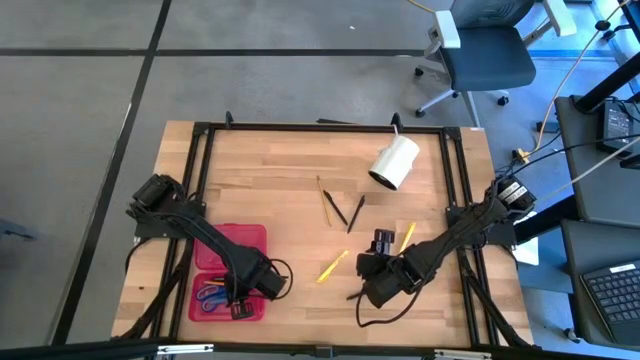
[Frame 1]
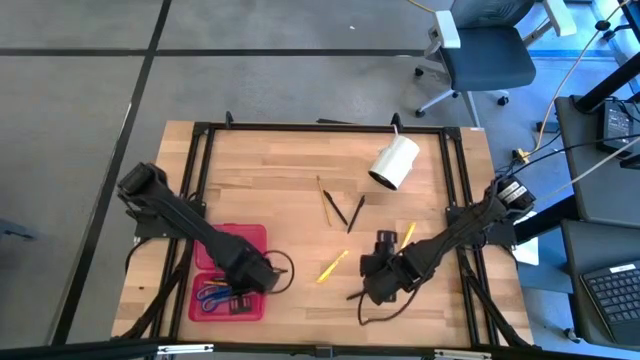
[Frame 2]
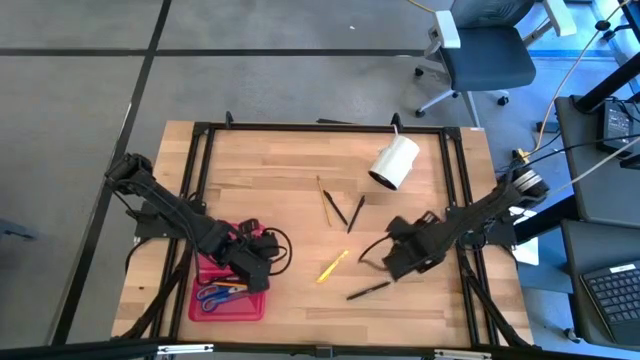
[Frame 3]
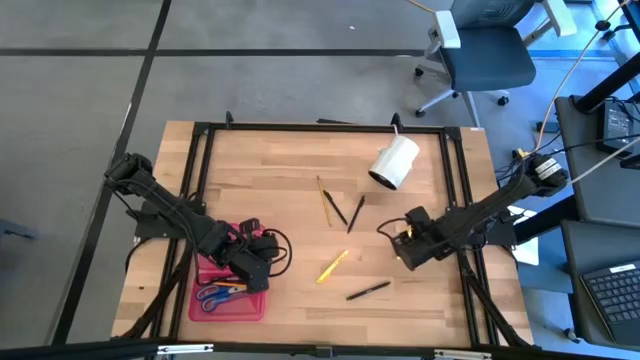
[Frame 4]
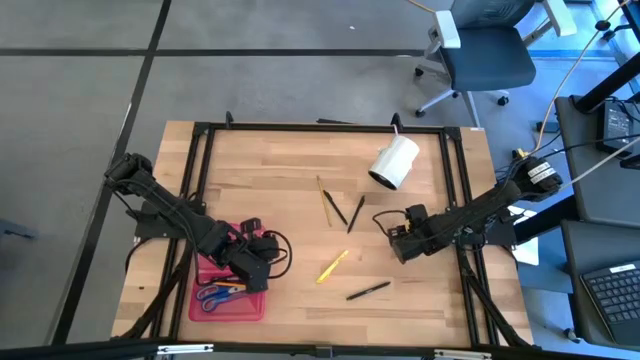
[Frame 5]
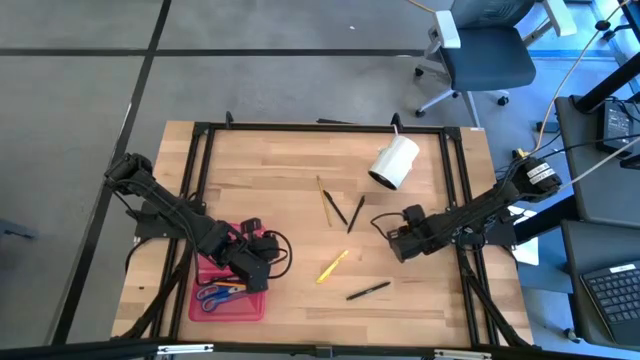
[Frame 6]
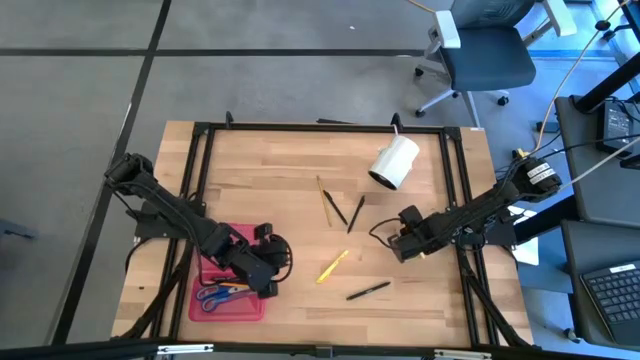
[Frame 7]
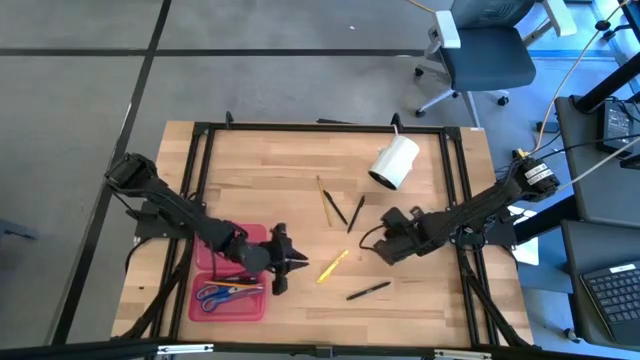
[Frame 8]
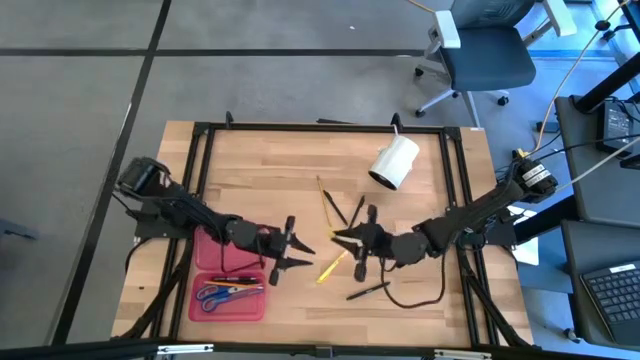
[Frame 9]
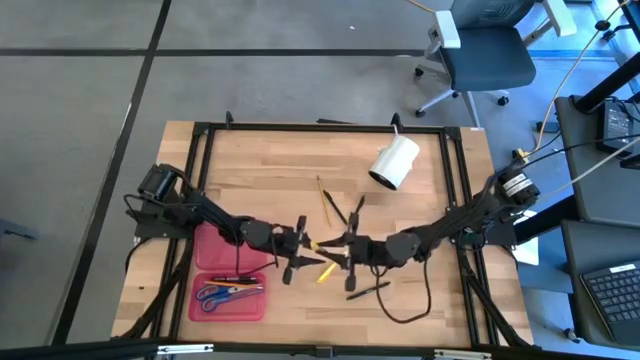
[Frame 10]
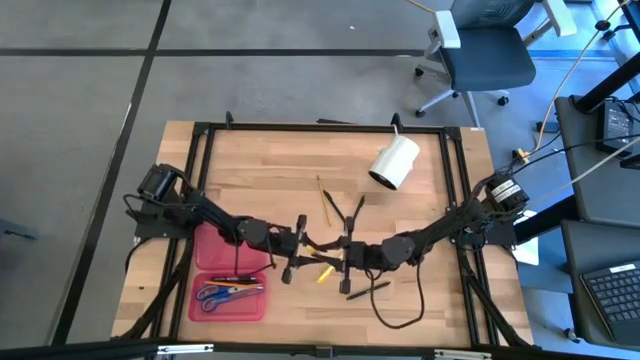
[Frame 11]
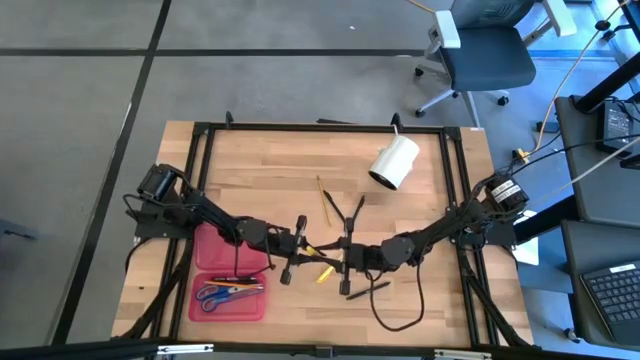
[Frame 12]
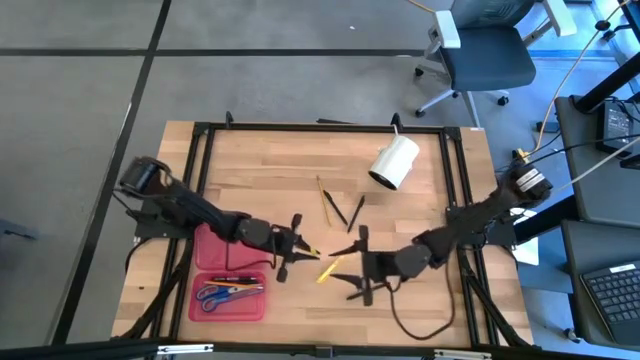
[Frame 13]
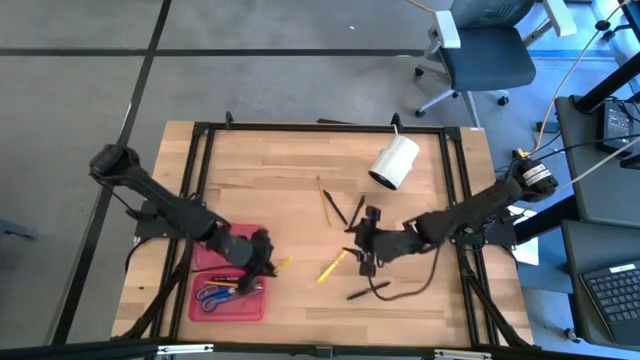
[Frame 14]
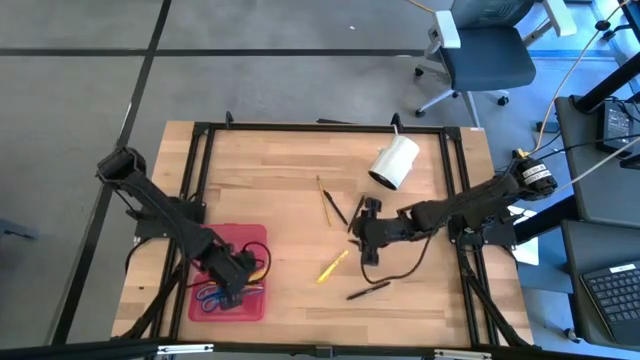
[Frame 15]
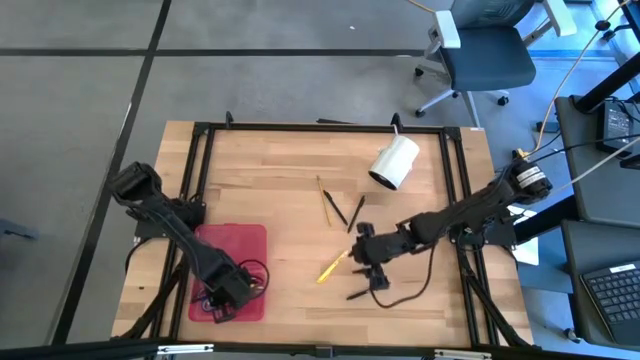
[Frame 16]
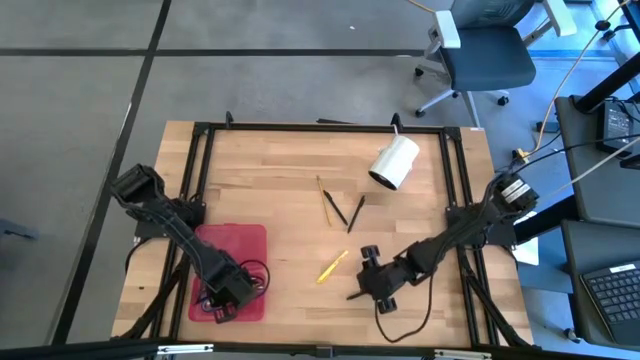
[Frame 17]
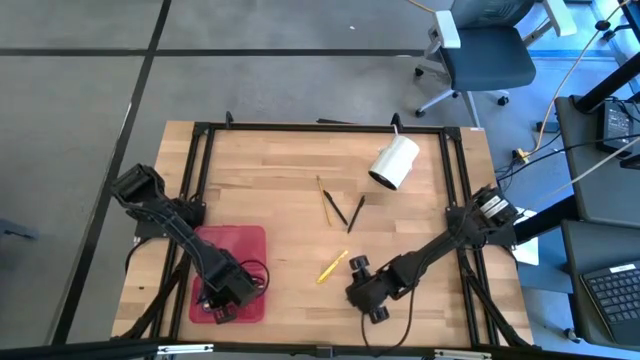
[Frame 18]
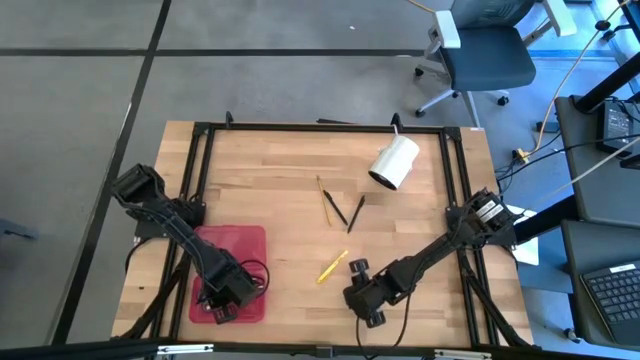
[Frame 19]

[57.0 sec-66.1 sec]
Task: Pick & place school supplies into a supply box
Put the yellow pen into the red supply box

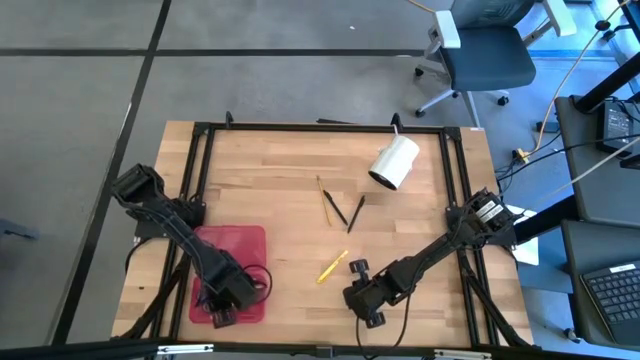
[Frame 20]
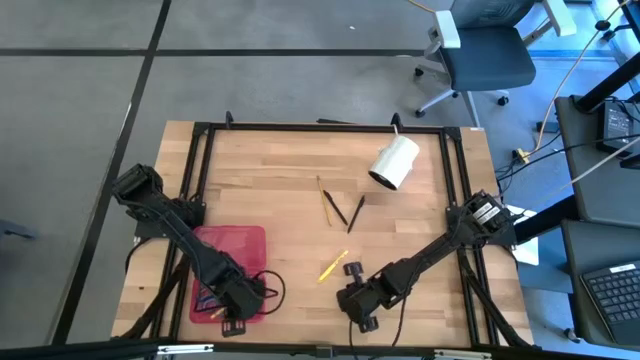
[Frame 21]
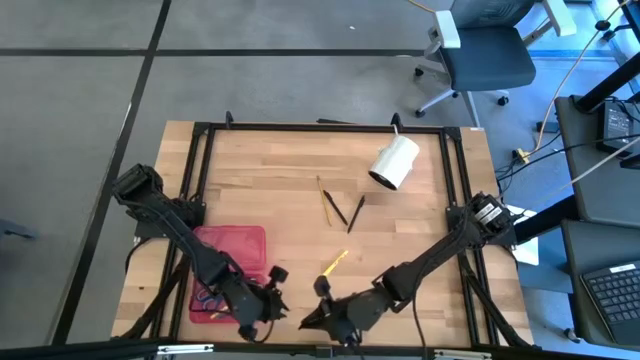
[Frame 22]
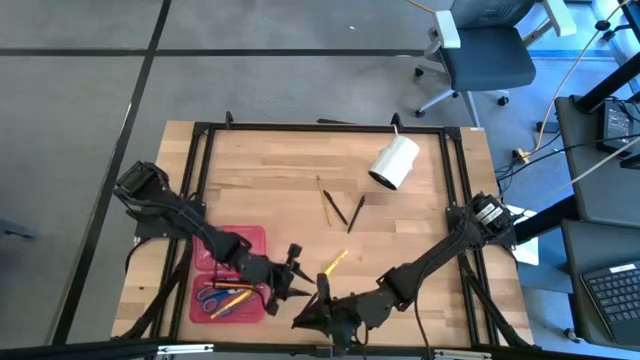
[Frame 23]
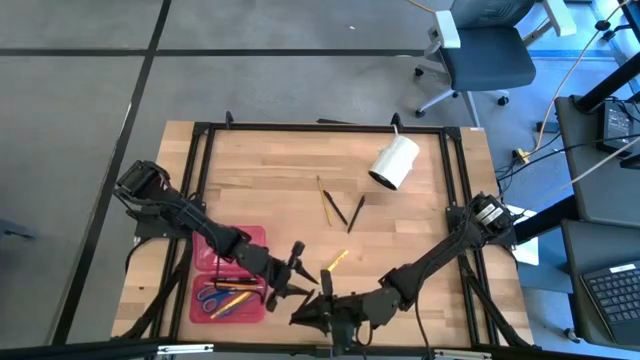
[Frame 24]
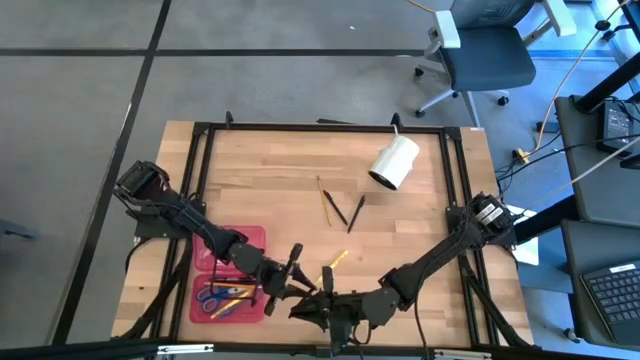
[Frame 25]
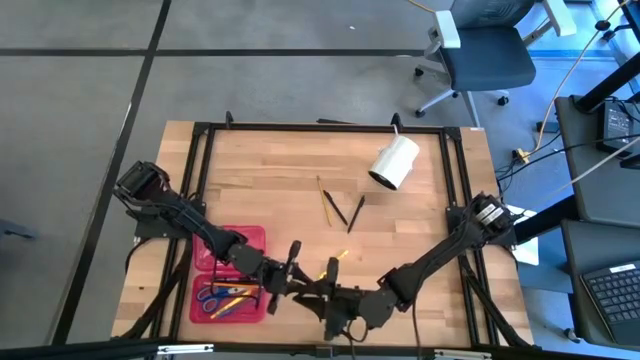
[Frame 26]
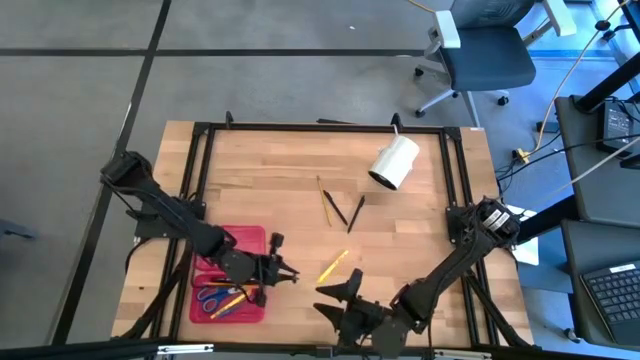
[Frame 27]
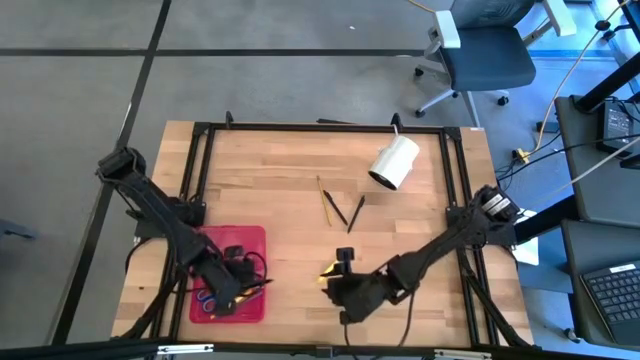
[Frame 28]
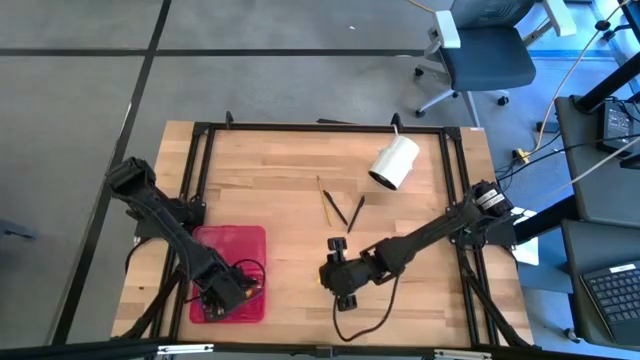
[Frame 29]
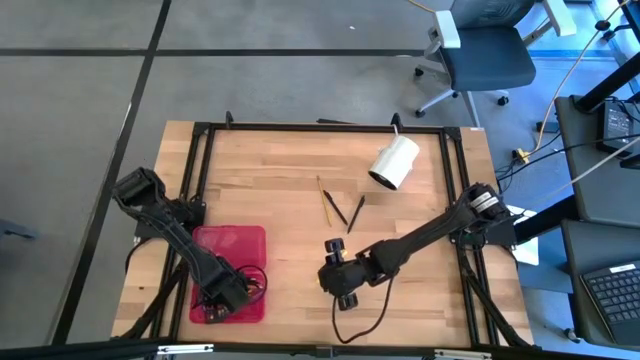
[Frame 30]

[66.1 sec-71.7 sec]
Put the black pen into the red supply box

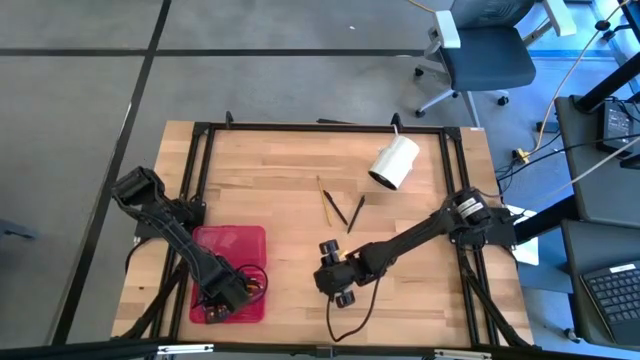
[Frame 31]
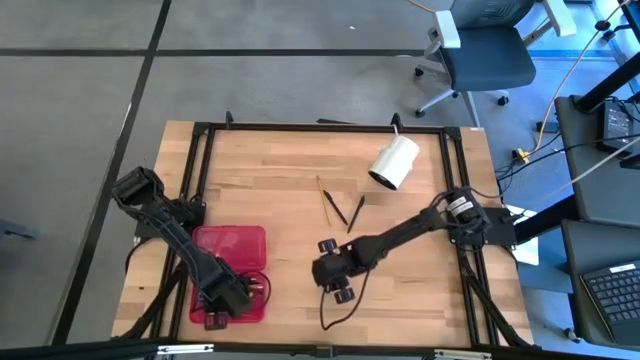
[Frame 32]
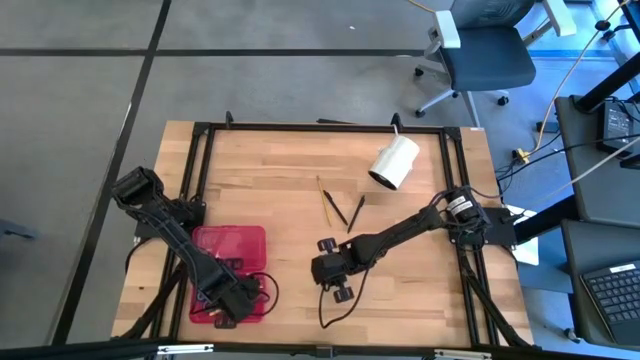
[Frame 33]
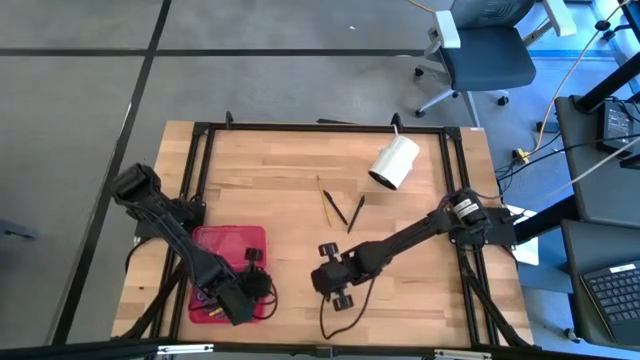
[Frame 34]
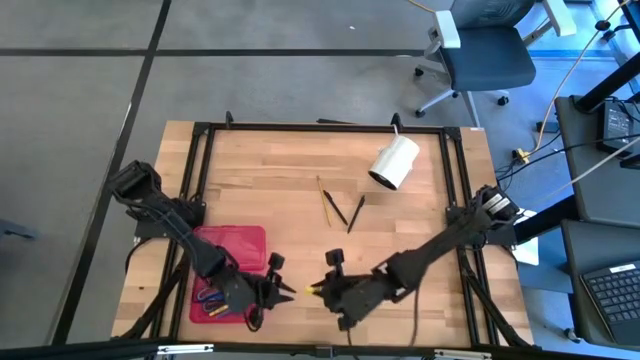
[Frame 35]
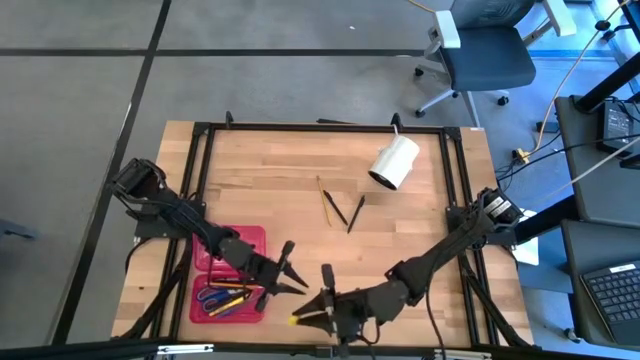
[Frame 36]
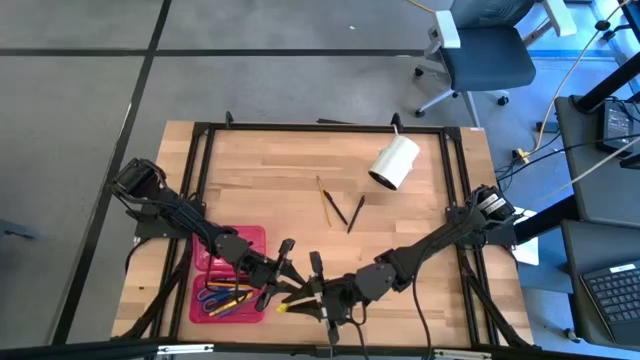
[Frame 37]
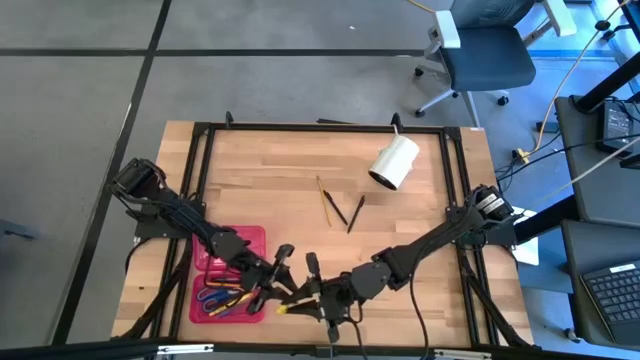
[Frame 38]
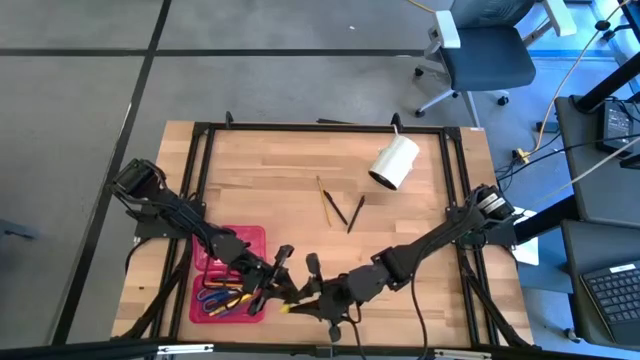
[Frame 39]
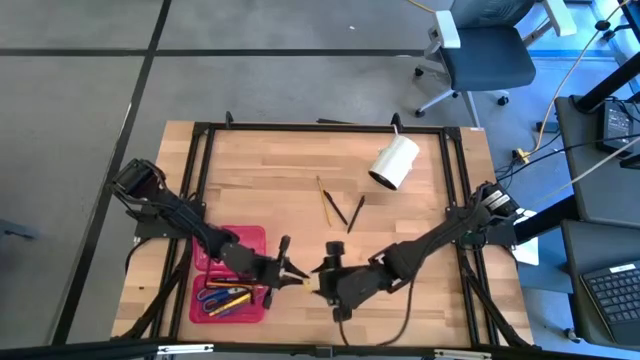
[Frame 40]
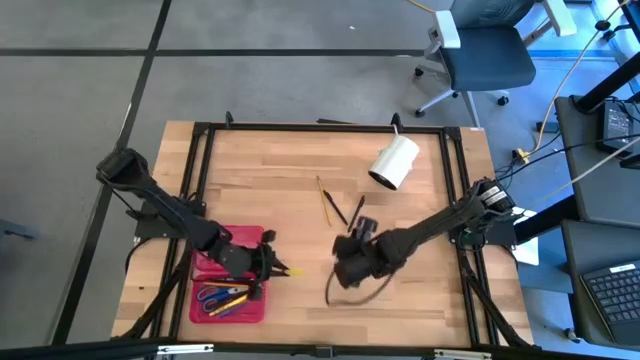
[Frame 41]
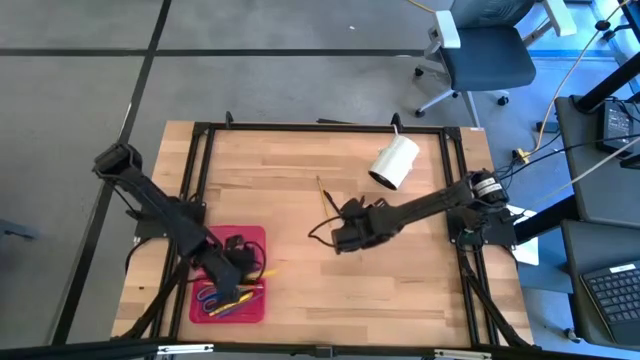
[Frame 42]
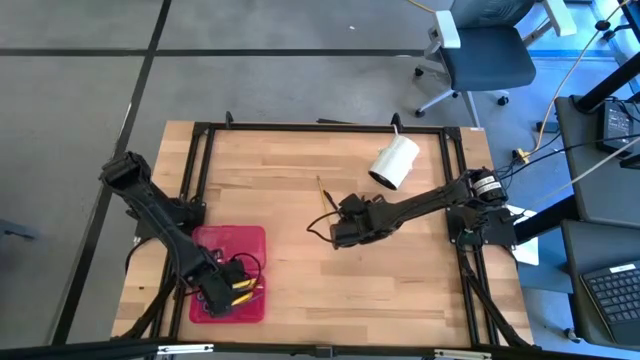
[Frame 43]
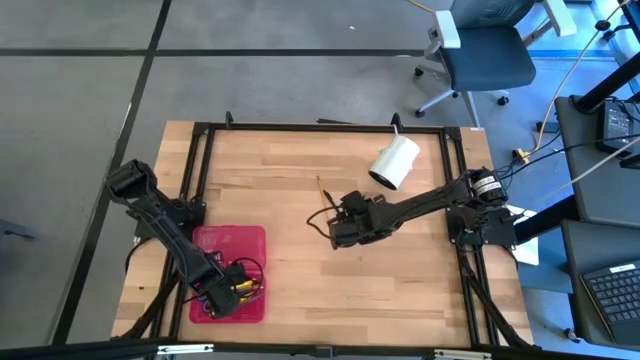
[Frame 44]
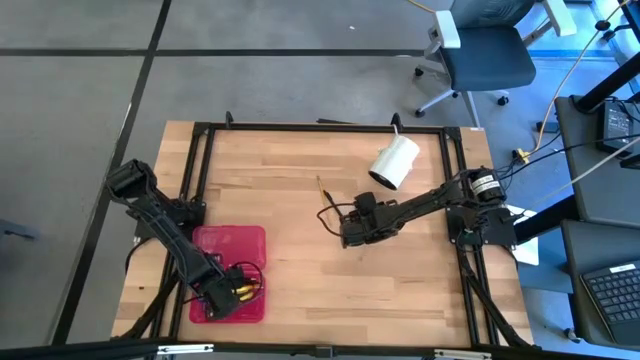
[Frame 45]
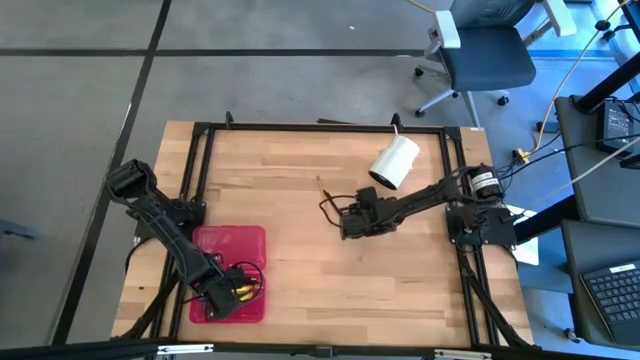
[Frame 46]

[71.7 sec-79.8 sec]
Put the yellow pen into the red supply box
